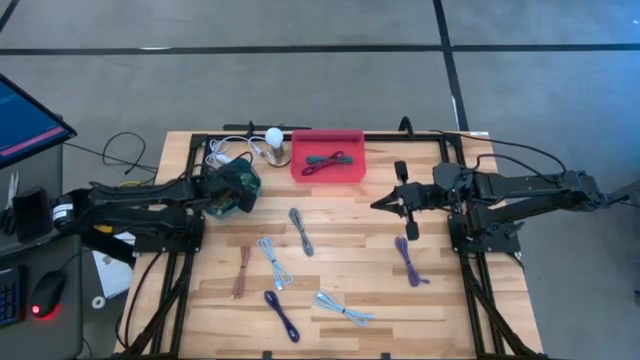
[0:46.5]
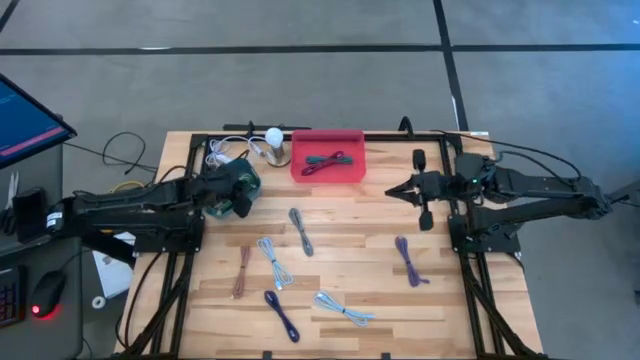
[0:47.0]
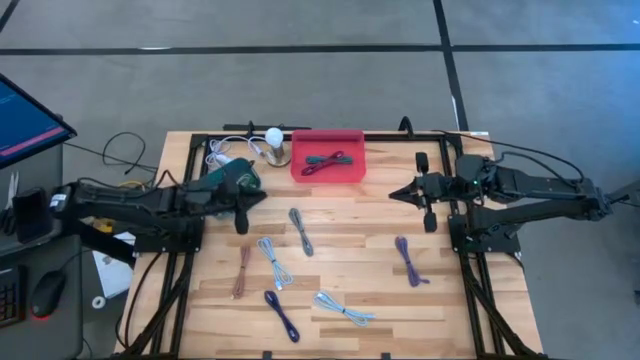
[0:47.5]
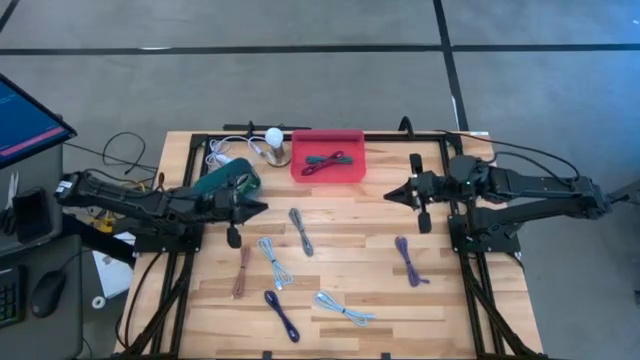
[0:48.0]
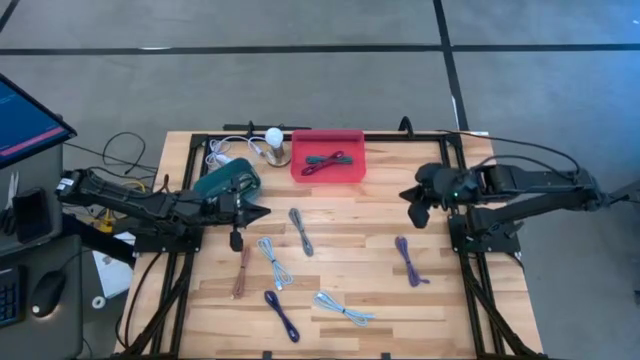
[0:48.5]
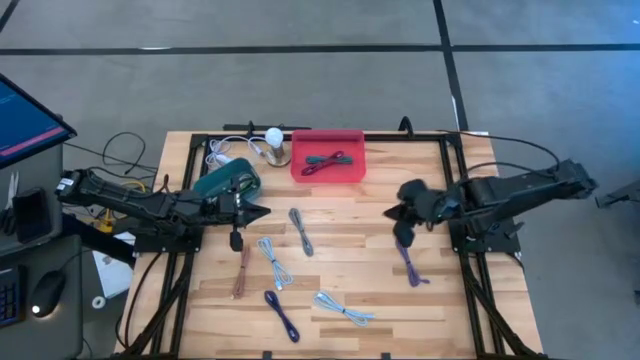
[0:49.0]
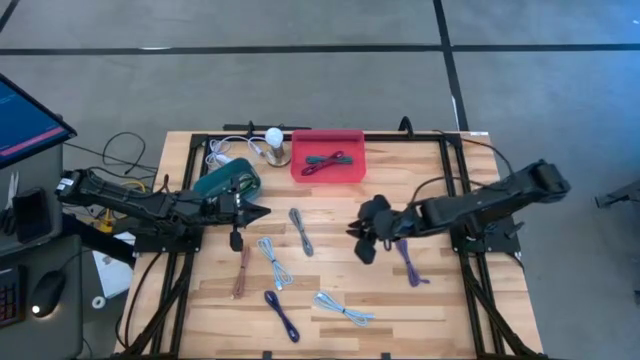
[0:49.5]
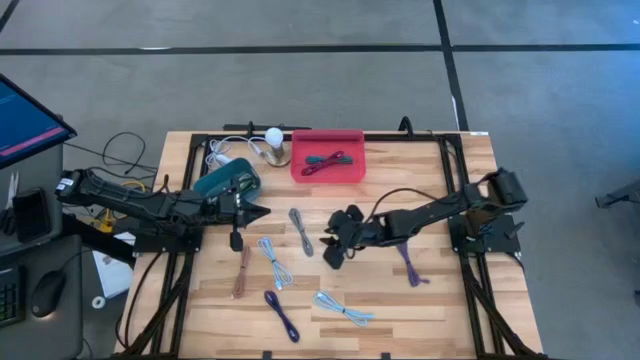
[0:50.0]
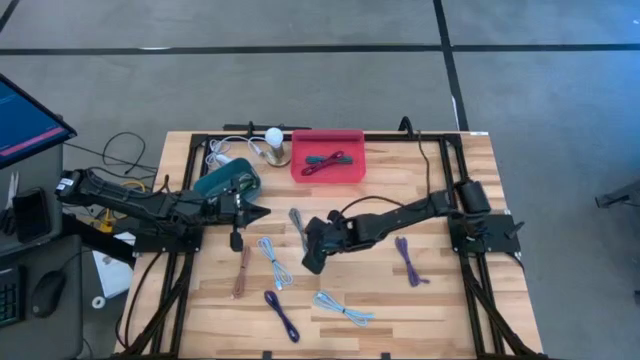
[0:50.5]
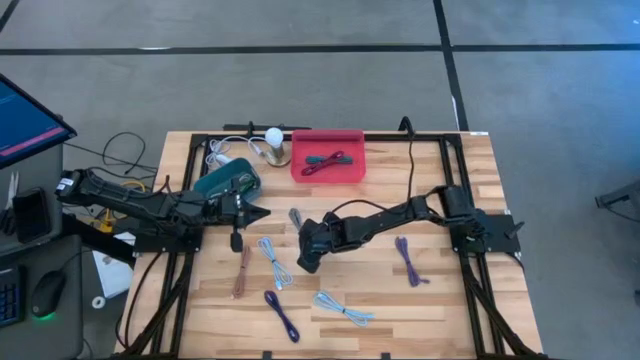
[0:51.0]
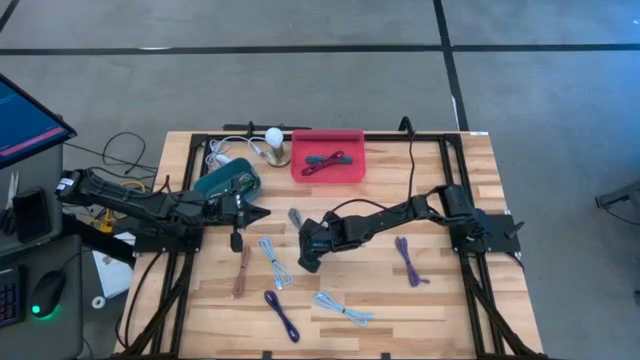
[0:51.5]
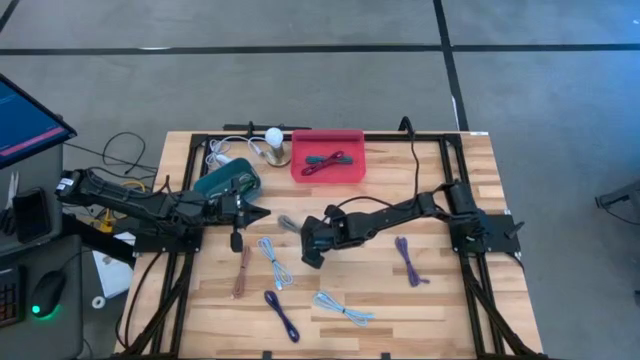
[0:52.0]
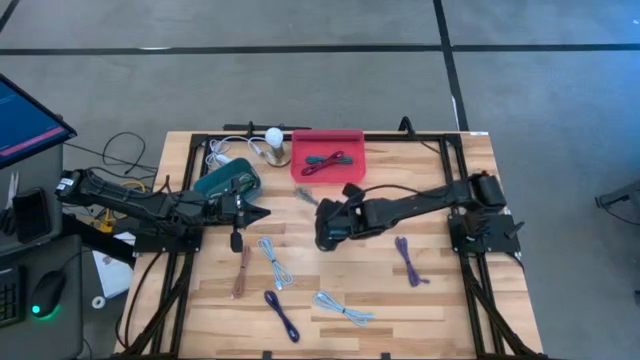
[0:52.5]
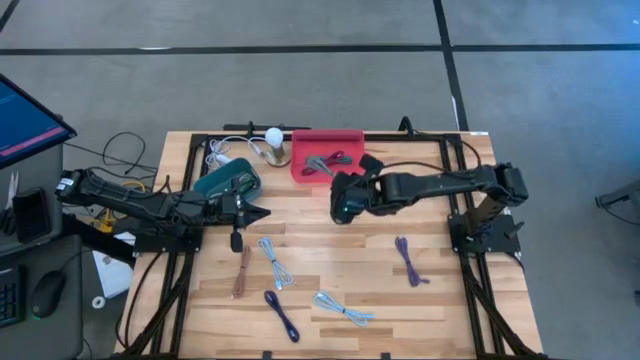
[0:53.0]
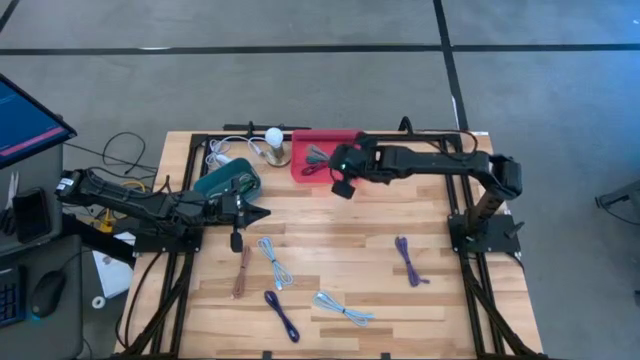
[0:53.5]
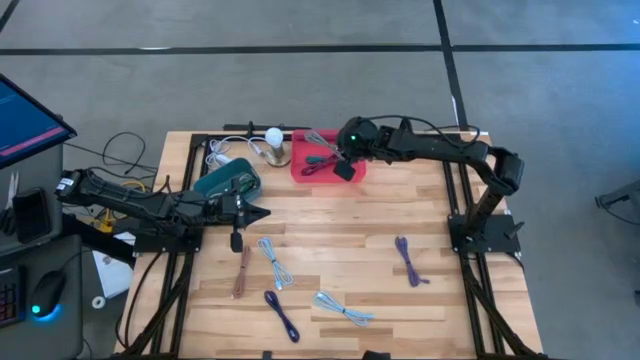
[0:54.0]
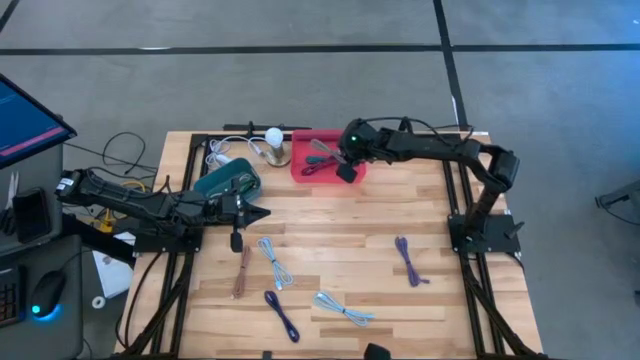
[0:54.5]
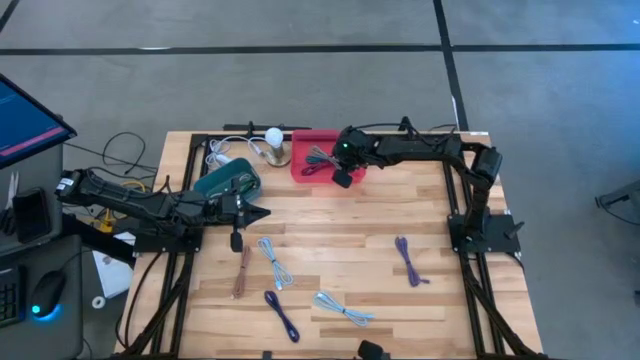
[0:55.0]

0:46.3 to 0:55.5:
Task: Pick & Place USB Port
Put the black and white USB cable into the pink bin

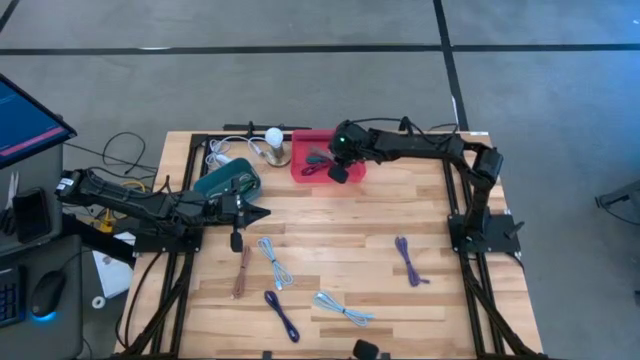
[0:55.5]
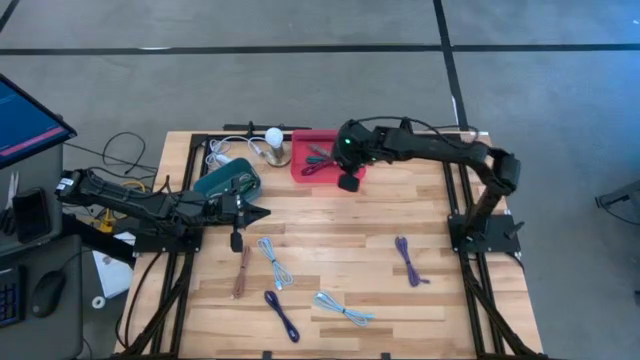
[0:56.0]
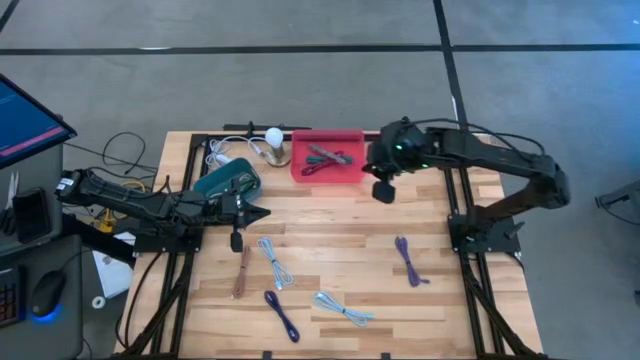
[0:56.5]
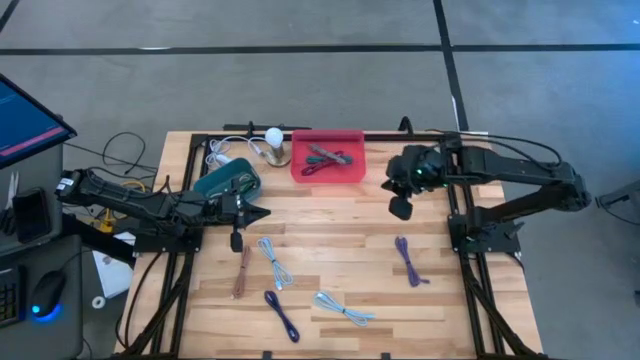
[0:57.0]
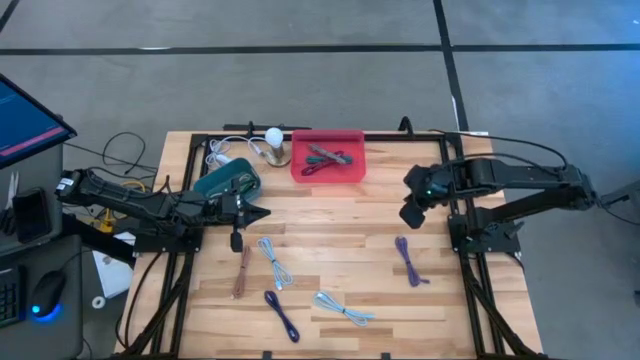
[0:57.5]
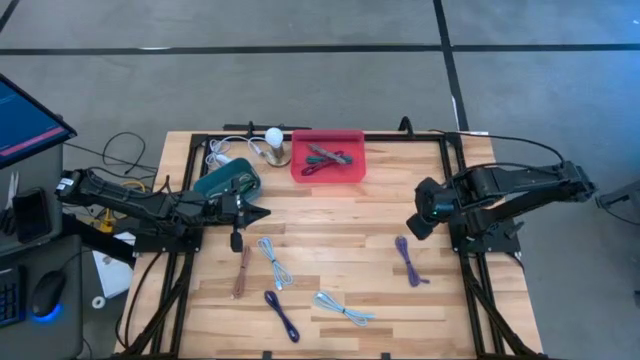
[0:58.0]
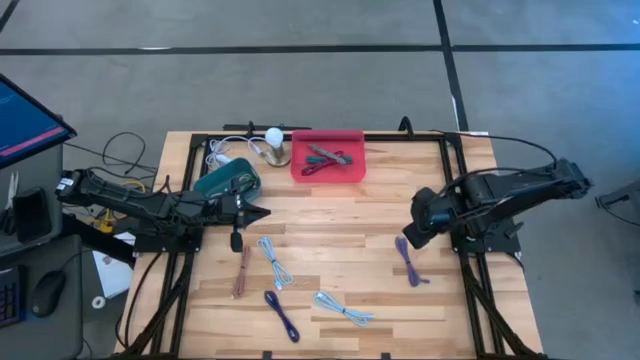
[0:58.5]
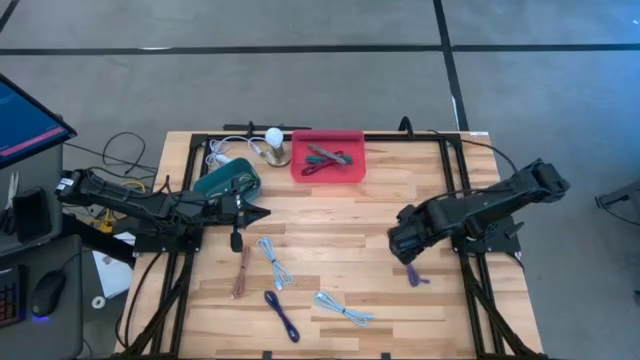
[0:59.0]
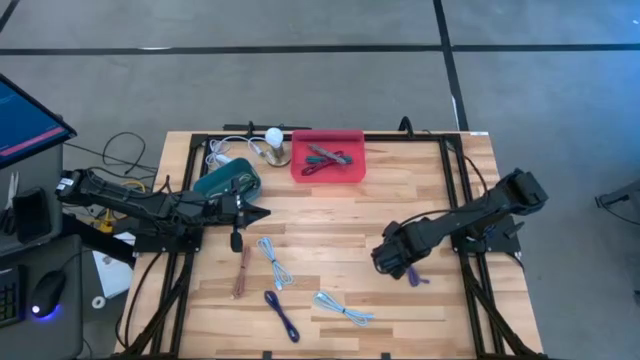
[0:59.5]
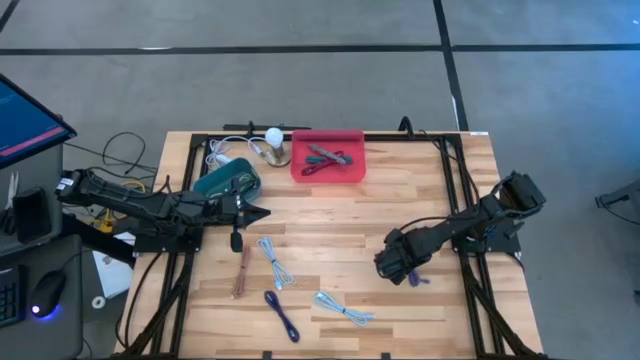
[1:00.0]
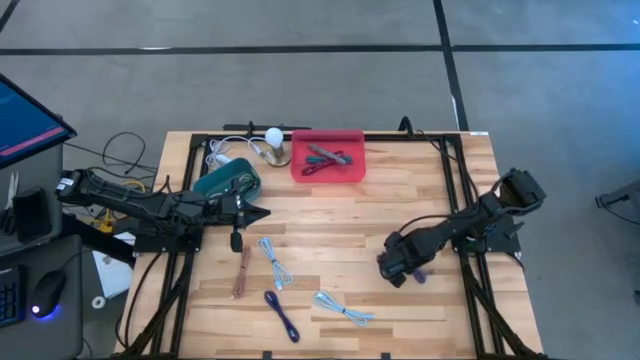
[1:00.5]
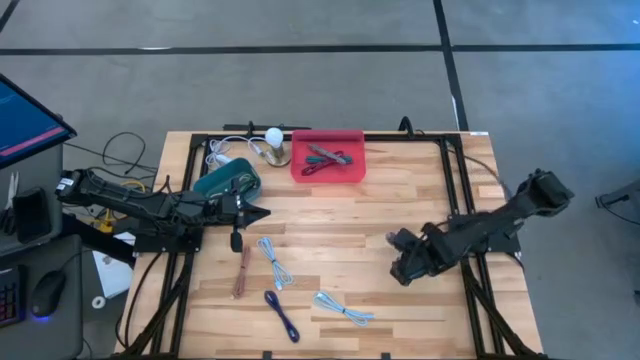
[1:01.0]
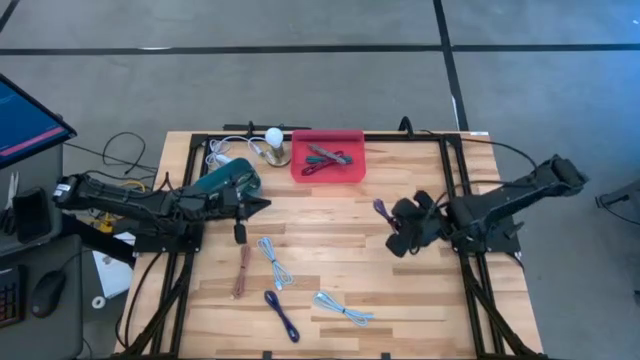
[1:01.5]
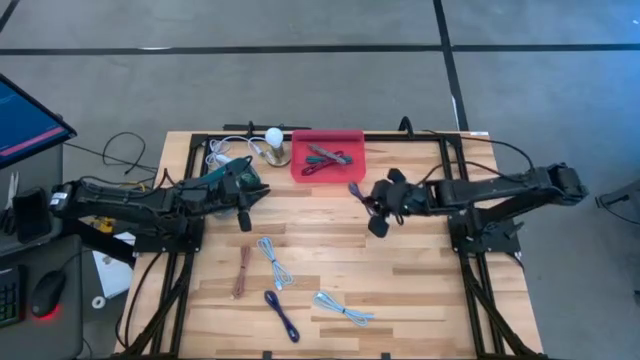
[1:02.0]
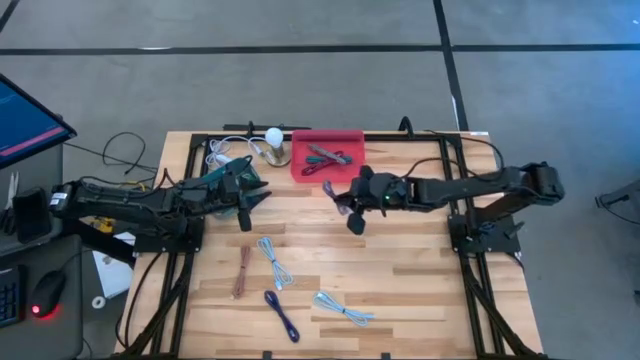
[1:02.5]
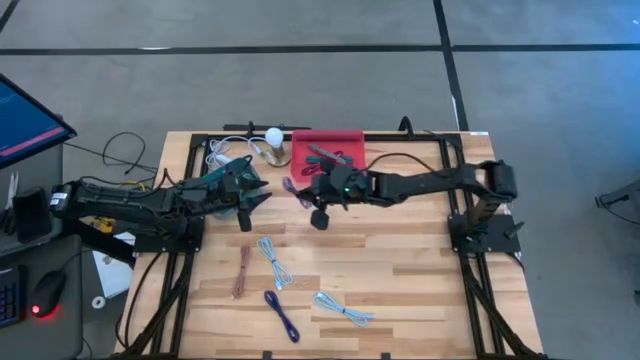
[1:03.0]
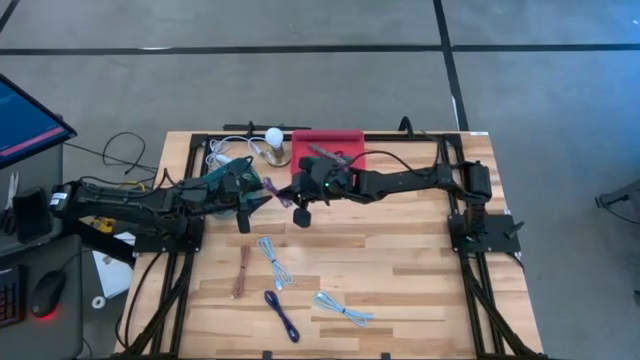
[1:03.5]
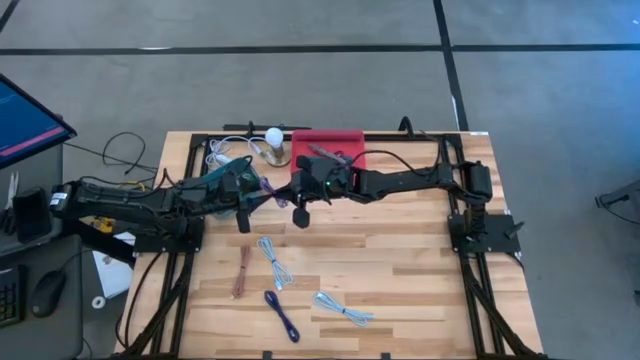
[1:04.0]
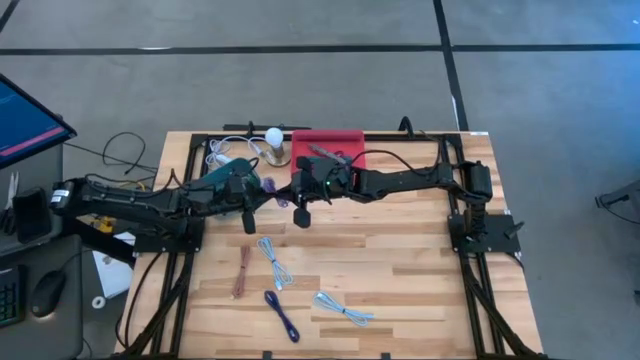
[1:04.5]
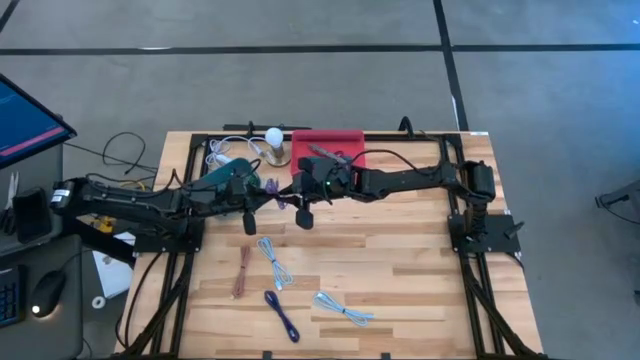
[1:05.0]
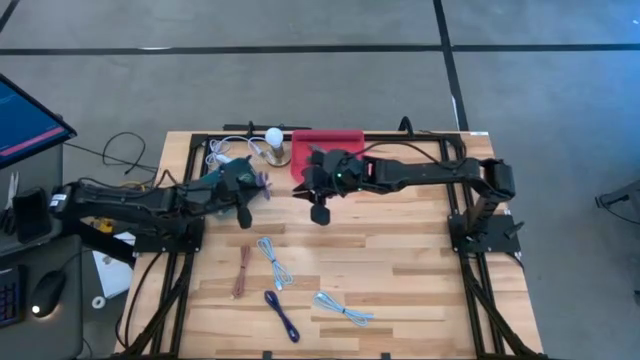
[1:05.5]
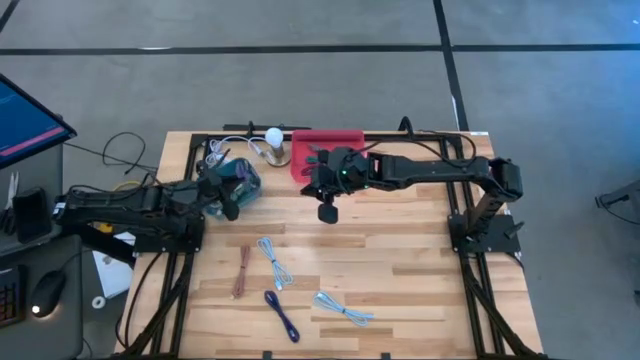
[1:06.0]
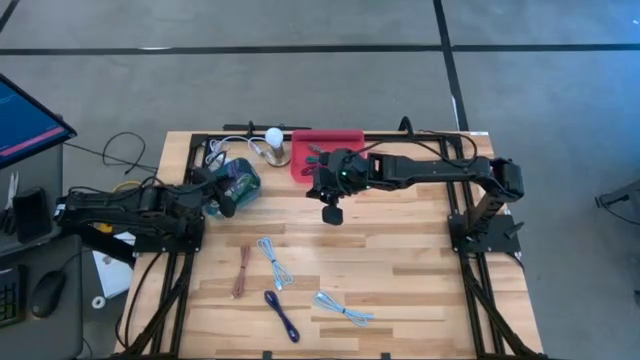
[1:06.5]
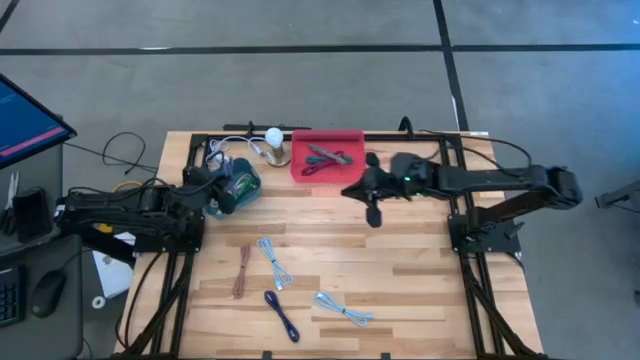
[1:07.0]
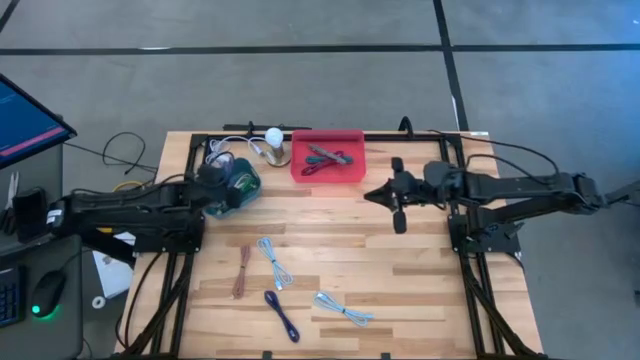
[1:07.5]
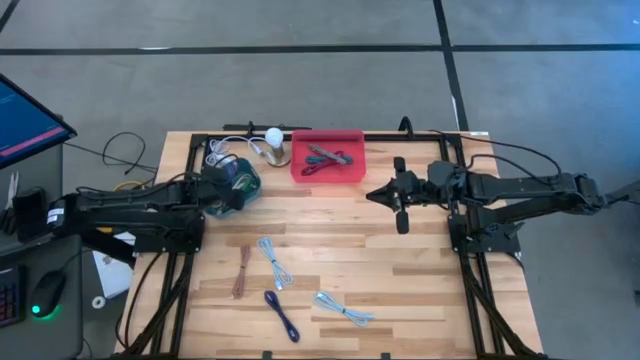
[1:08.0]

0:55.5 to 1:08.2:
Put the violet USB cable into the blue bin
